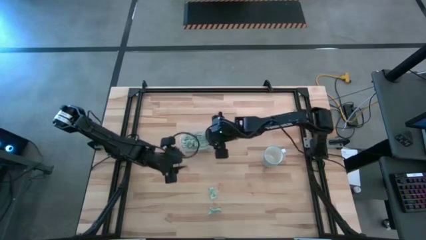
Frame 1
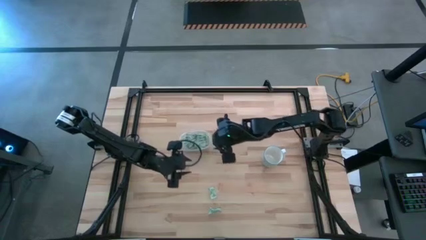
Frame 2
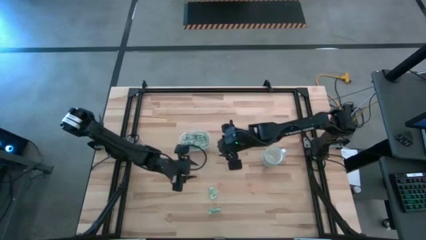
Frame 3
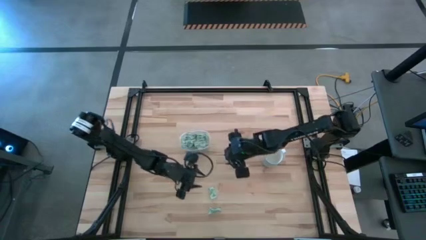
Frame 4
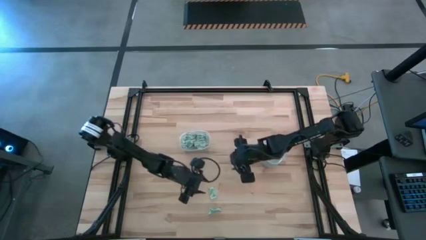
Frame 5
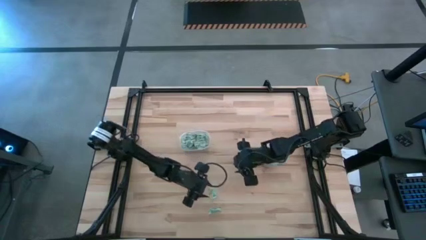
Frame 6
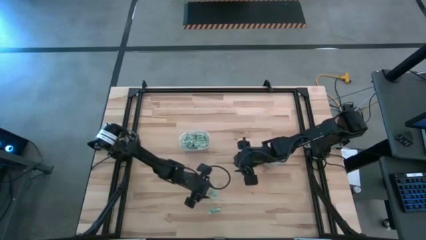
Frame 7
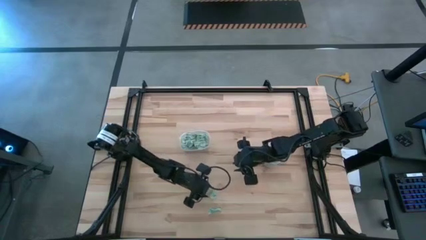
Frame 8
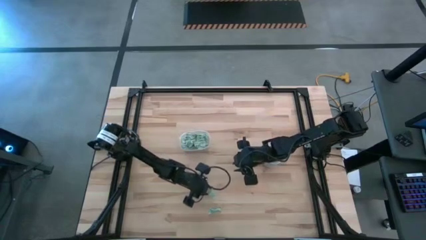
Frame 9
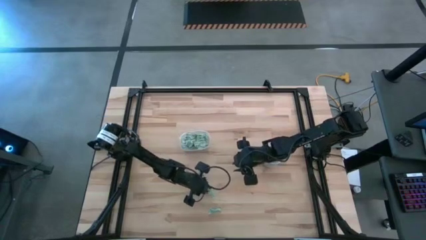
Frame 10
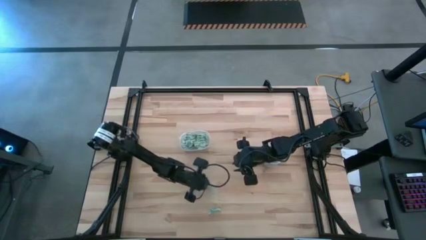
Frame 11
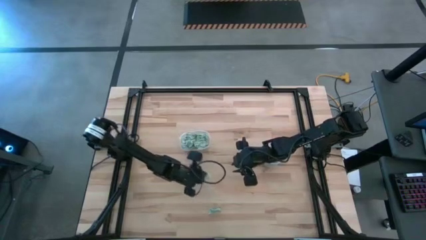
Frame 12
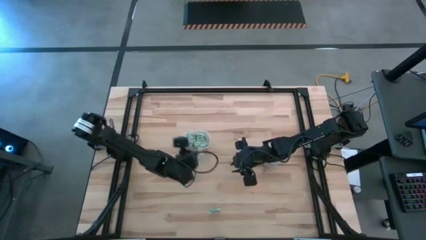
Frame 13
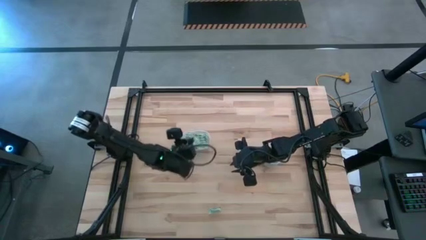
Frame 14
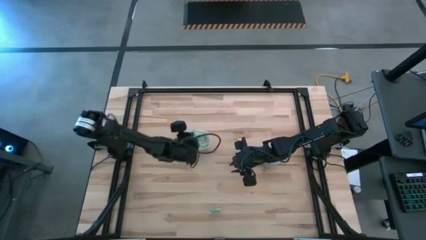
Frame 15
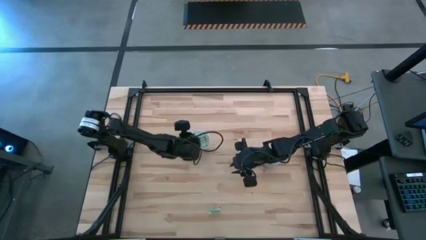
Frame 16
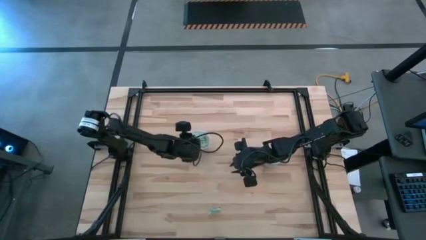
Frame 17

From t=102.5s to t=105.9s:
Task: Pick and place Stevia / Truvia into bins
Put the top stevia packet into the transparent bin

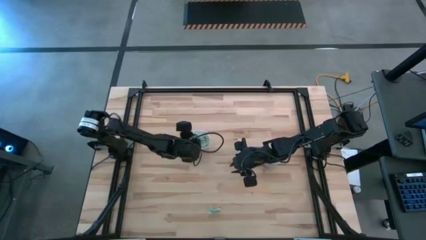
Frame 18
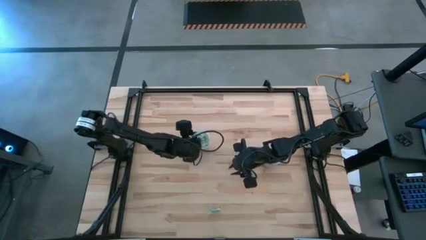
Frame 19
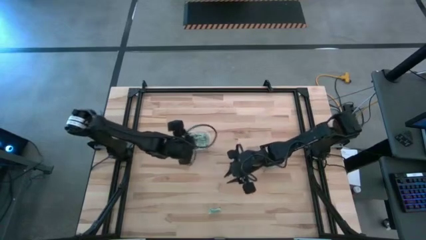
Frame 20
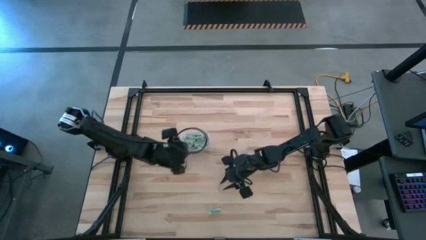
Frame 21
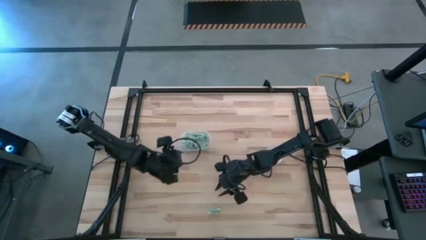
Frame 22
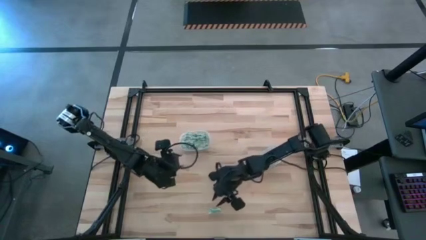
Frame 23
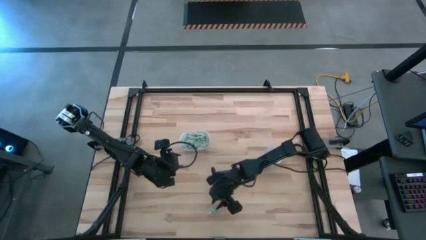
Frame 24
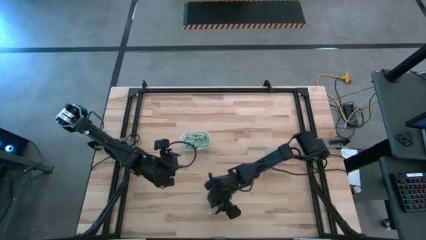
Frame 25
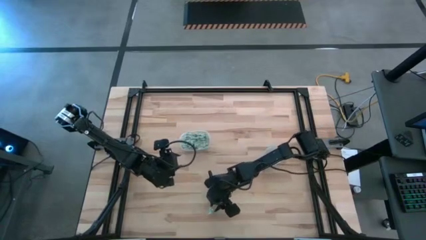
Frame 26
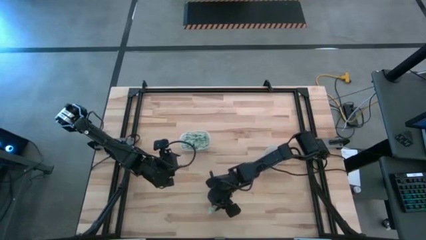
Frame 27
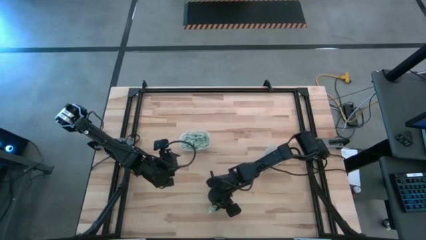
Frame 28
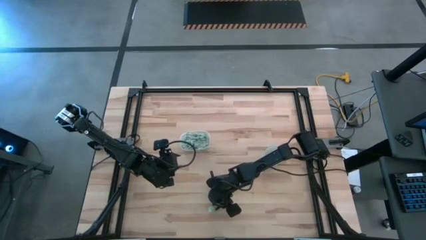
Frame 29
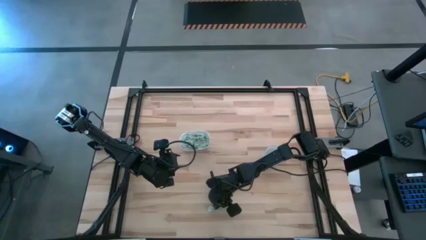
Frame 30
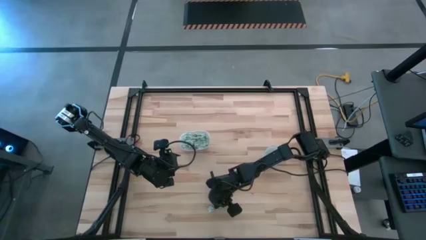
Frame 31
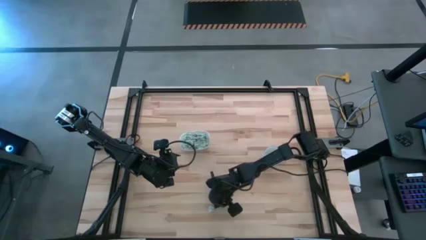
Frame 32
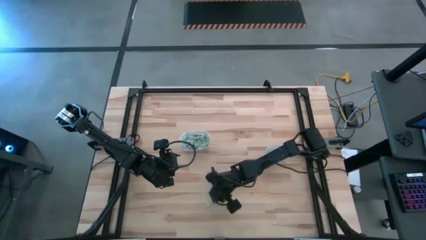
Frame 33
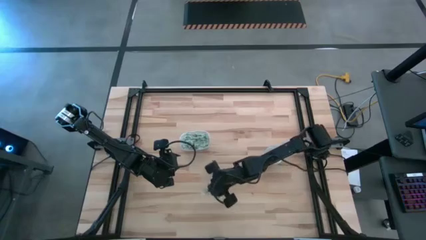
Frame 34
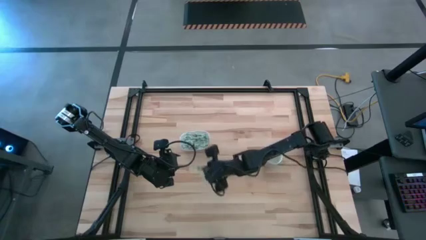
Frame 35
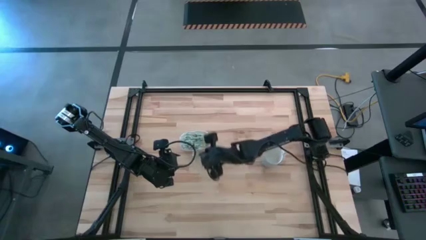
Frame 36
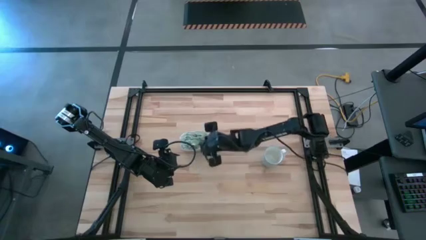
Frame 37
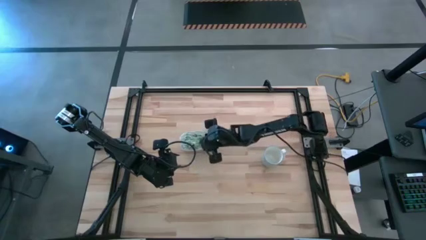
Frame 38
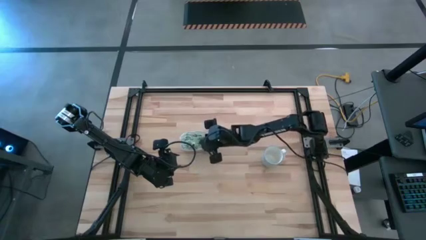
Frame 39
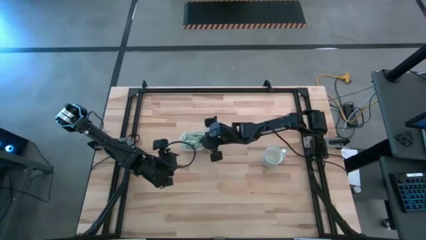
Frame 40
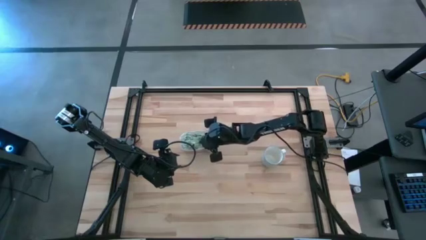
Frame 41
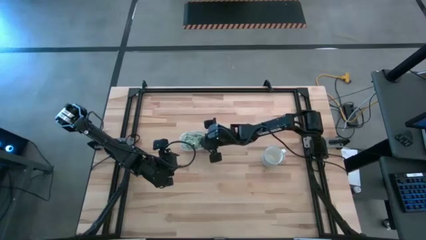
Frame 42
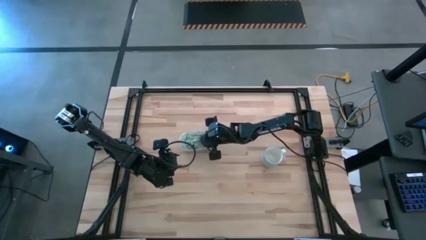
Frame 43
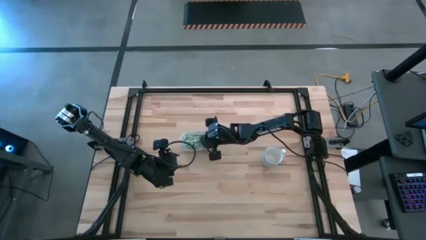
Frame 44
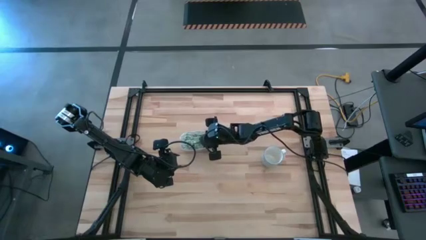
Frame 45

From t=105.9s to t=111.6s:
Put the stevia packet into the transparent bin

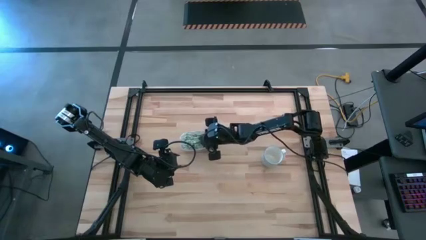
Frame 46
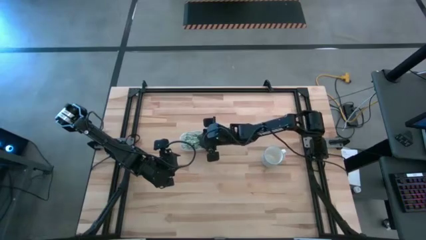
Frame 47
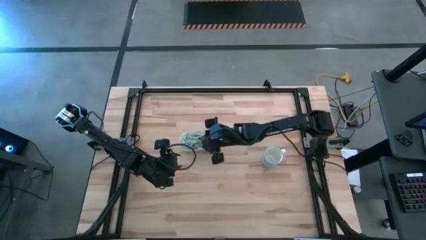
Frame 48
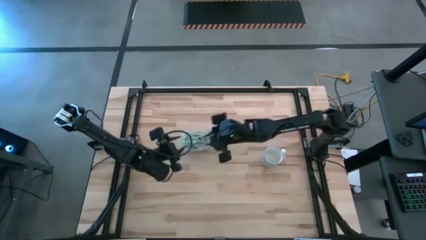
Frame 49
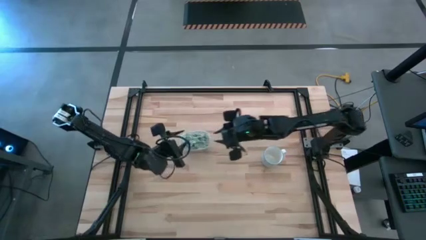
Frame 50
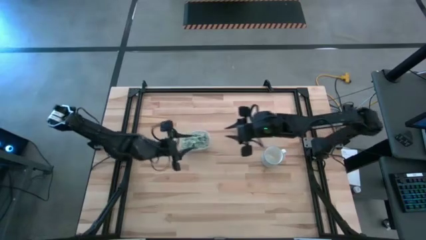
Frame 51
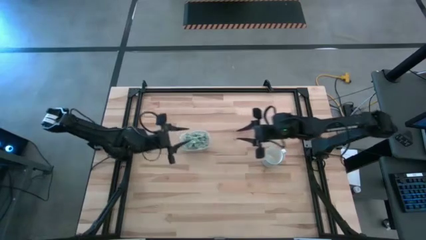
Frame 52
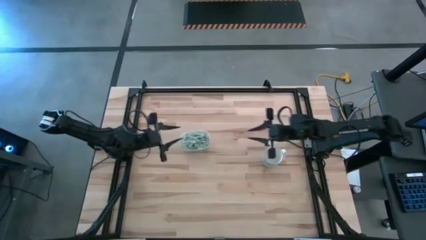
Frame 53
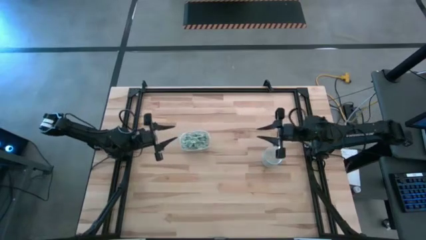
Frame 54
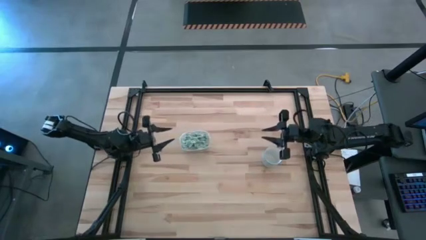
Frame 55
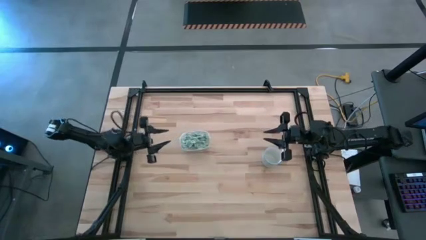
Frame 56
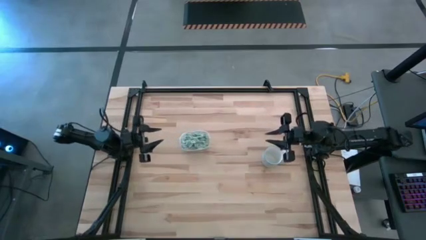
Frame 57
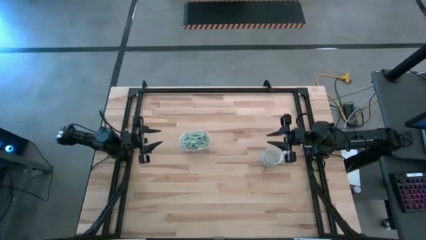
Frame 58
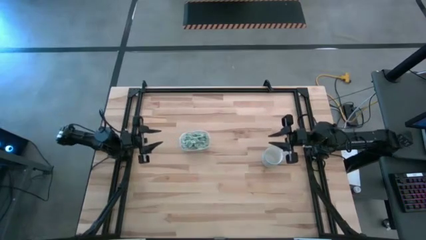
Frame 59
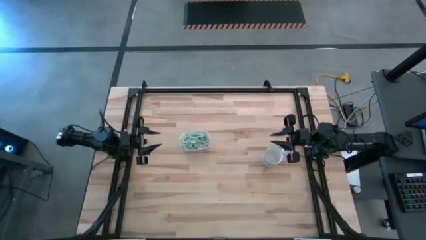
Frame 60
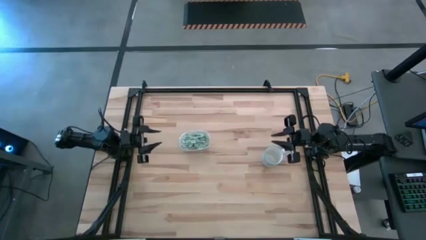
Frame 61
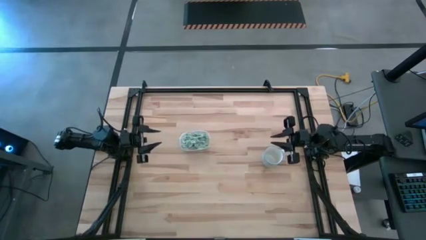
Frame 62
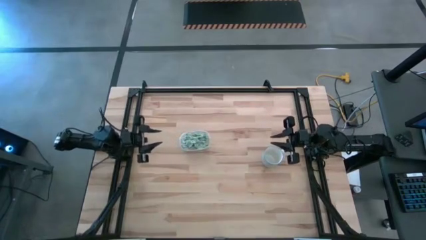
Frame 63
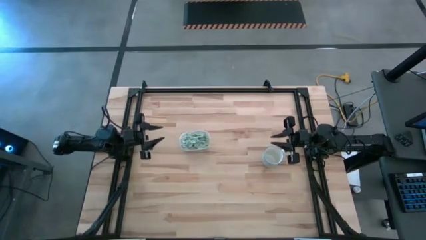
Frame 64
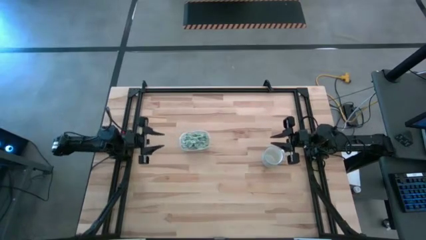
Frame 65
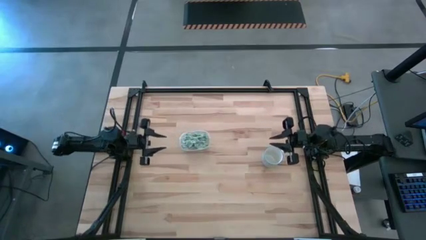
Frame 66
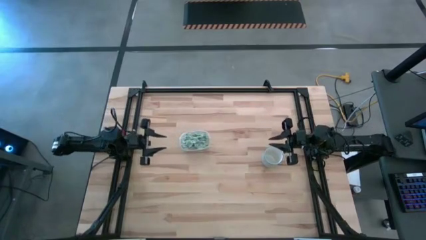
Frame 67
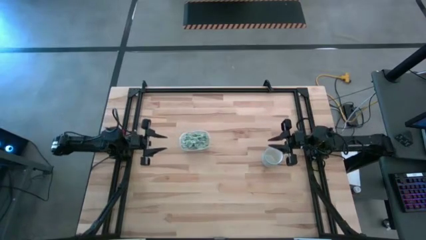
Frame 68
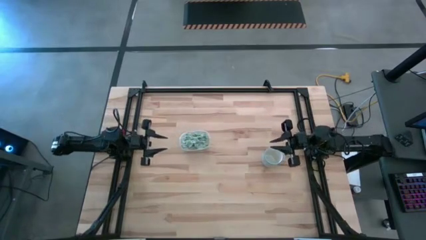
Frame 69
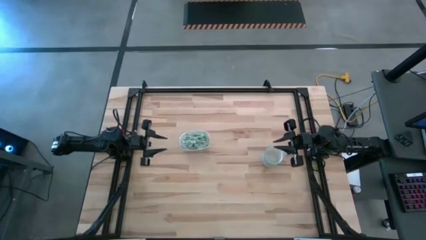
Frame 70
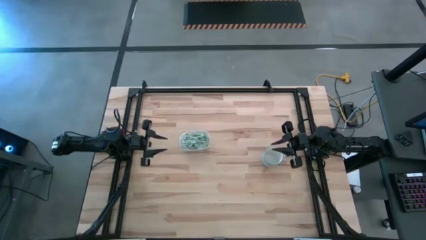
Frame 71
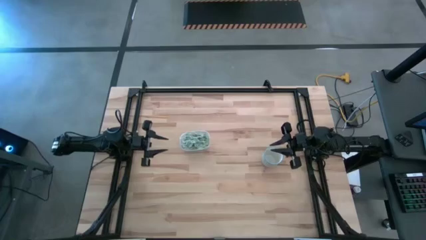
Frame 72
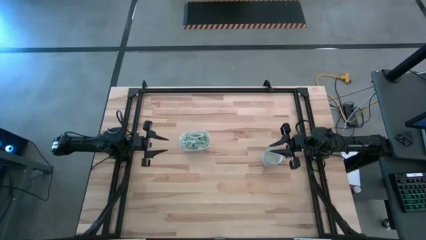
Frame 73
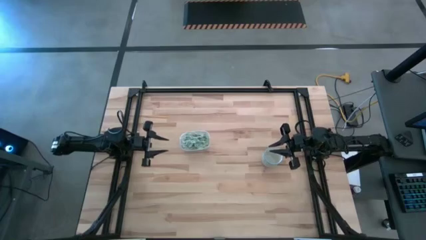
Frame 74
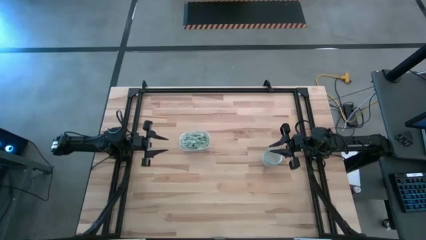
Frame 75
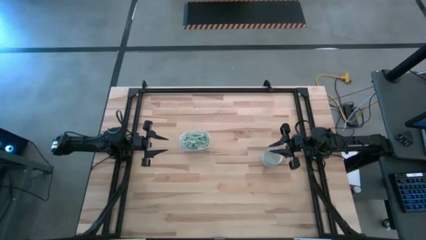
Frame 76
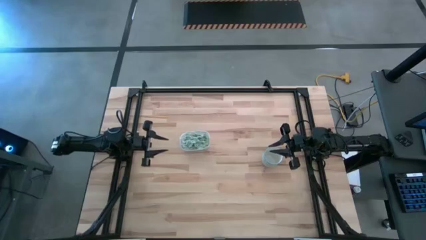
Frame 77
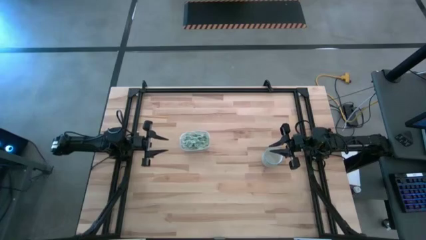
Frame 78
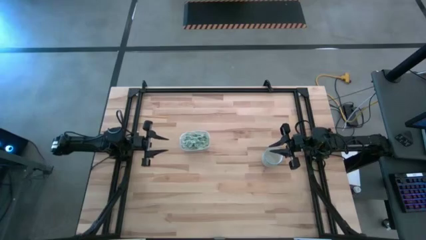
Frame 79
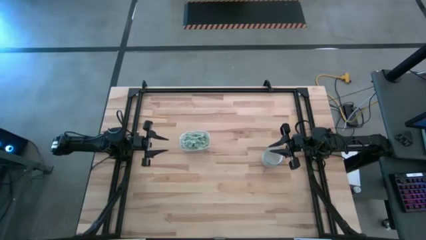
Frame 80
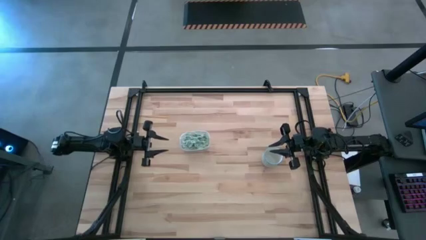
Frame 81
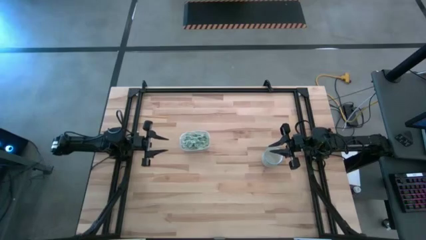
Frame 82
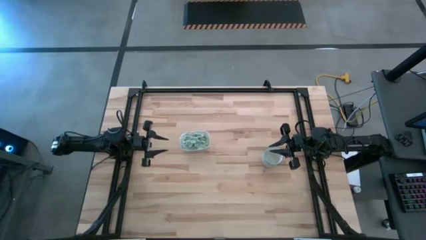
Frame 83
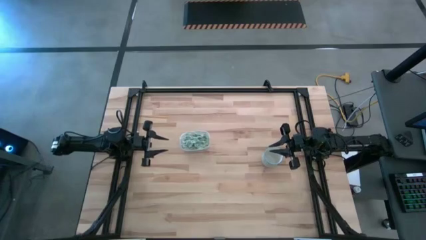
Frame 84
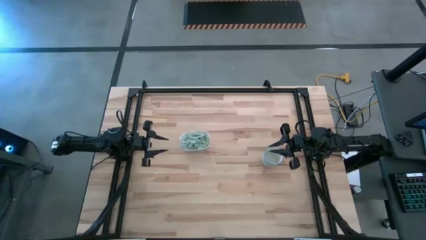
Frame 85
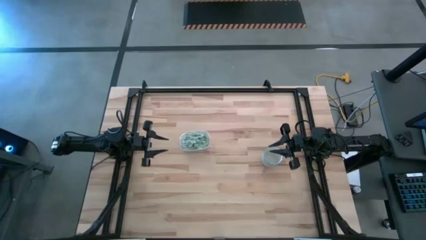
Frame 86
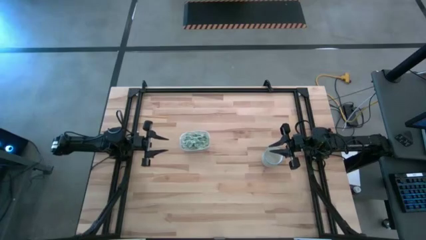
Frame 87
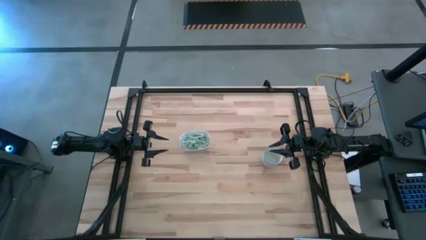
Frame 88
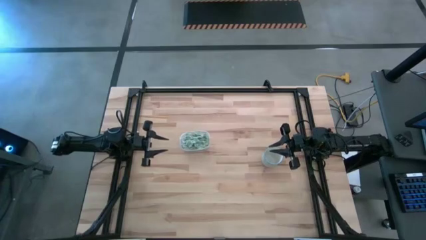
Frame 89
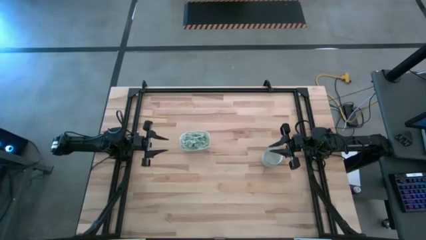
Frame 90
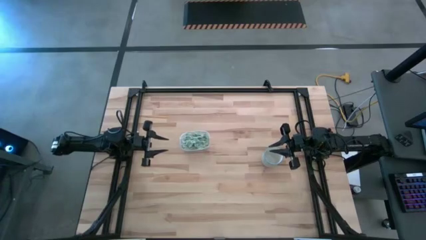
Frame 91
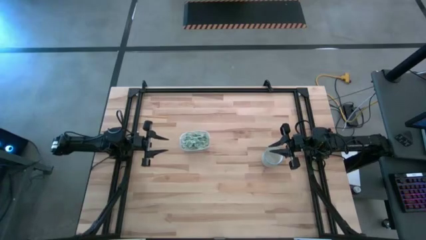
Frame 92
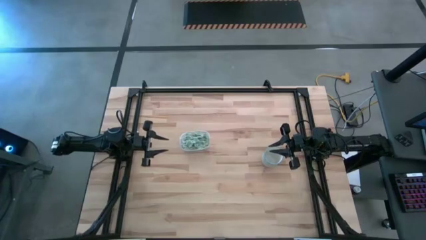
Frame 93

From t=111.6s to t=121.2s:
Return to Home Position
